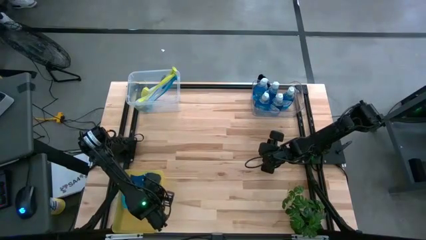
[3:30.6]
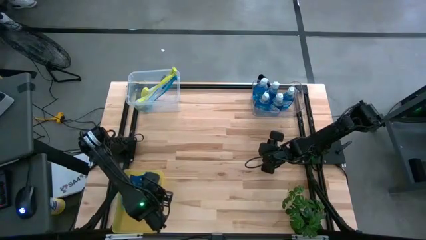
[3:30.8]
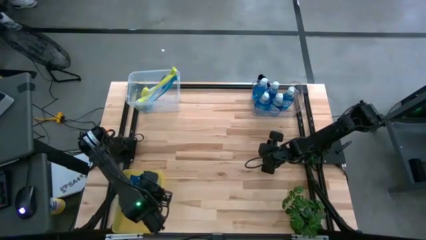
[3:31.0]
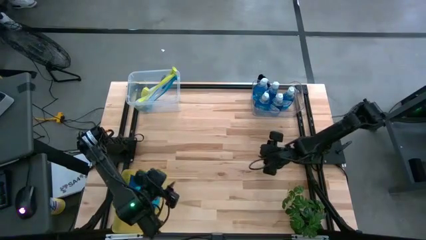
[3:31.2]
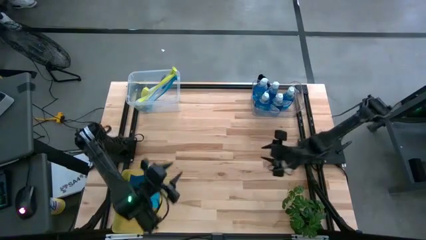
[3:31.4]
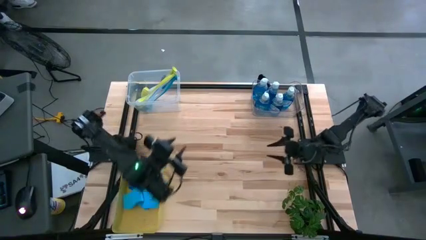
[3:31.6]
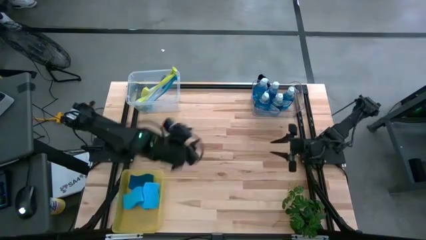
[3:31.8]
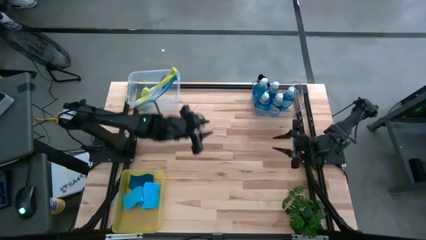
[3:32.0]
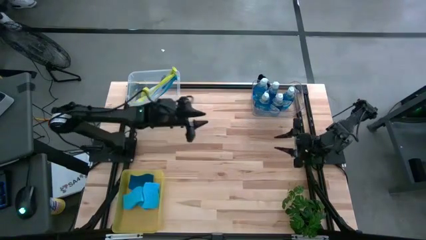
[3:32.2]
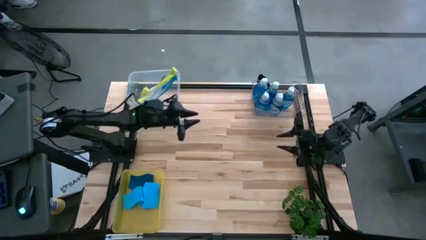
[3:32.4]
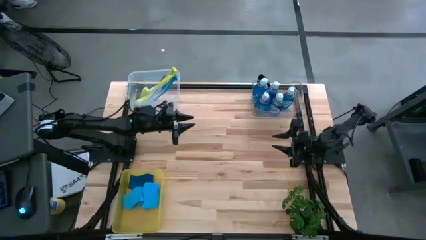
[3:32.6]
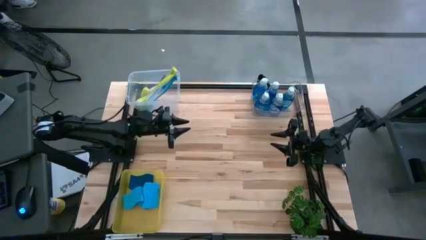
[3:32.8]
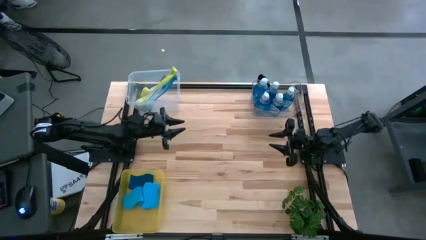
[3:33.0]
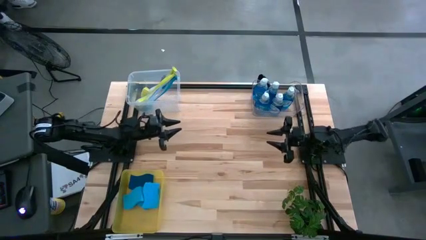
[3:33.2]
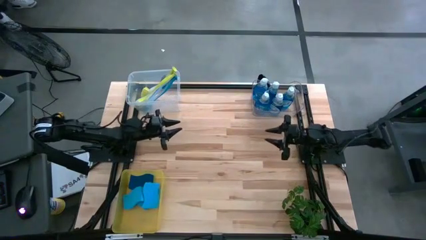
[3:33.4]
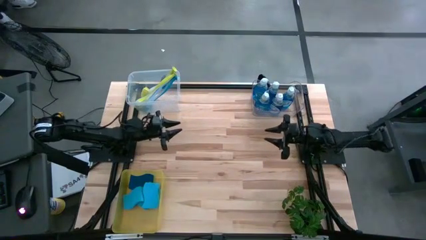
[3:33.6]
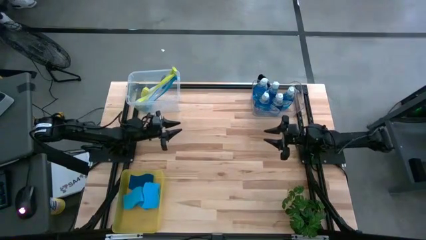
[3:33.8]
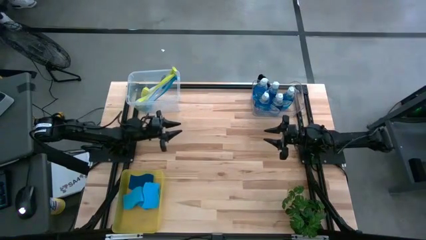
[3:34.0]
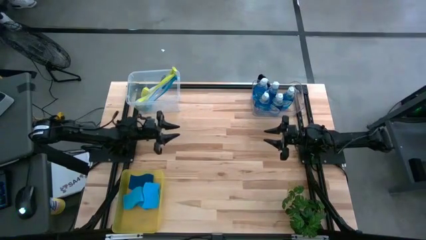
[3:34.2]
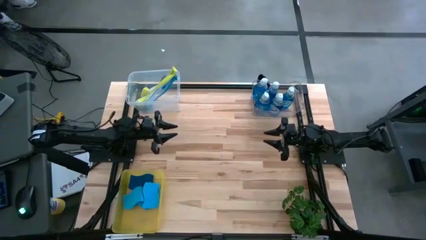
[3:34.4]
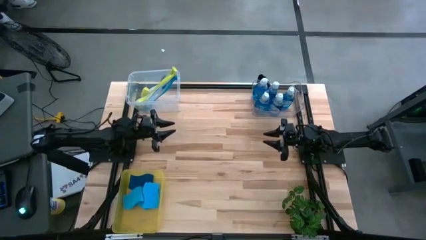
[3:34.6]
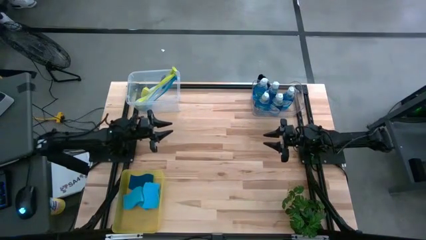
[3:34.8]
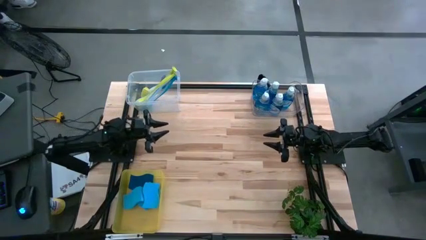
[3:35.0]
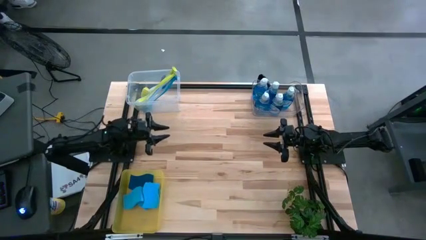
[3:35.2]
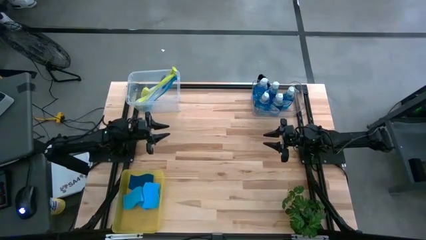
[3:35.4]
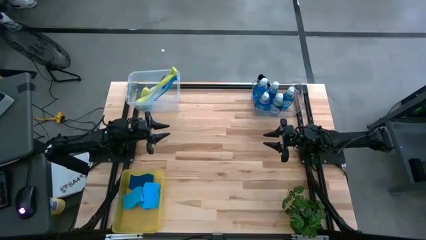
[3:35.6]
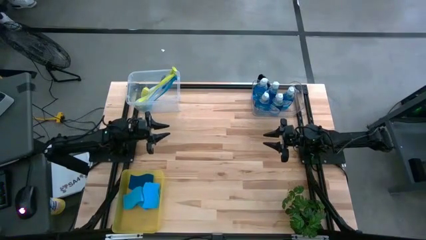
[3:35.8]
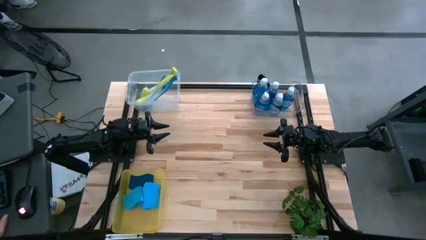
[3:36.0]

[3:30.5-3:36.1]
Task: Pick & Place Kitchen Sink Supplies
Return to Home Position

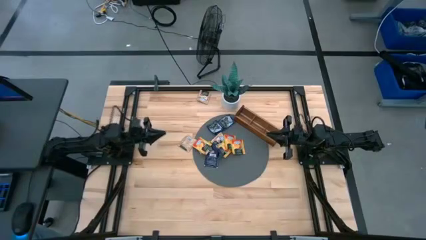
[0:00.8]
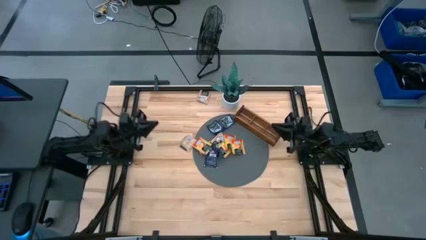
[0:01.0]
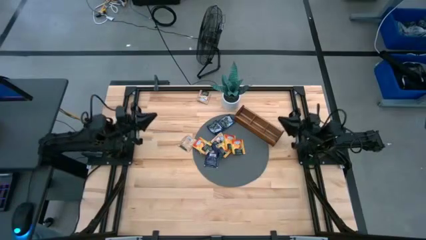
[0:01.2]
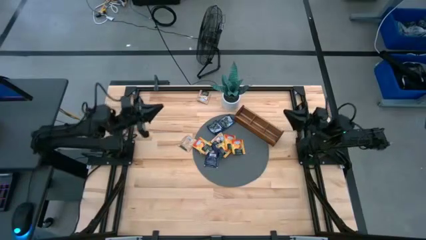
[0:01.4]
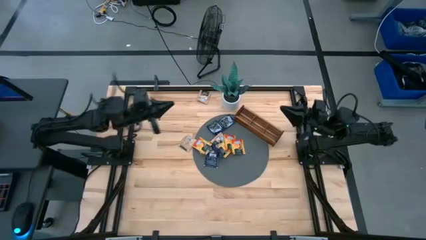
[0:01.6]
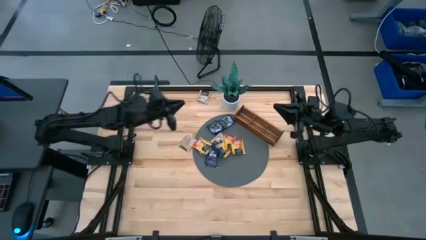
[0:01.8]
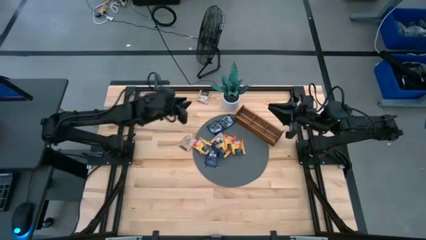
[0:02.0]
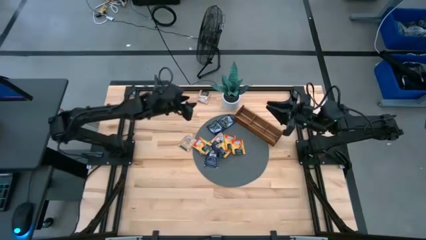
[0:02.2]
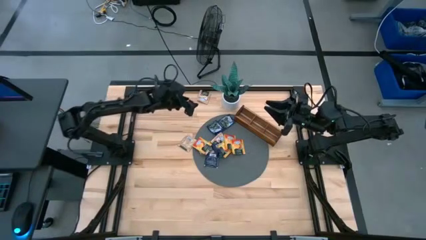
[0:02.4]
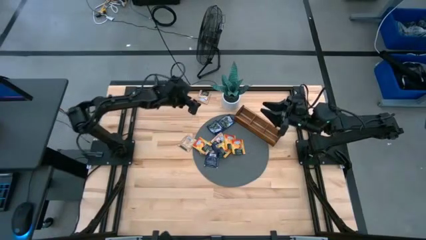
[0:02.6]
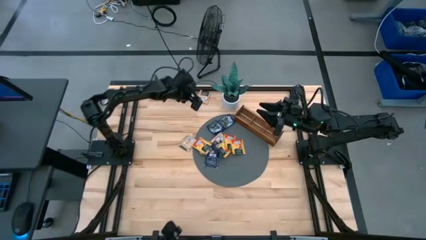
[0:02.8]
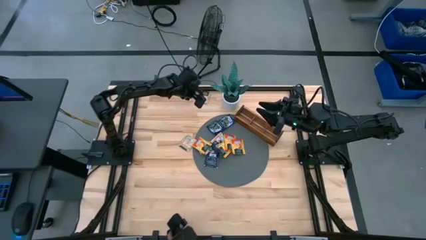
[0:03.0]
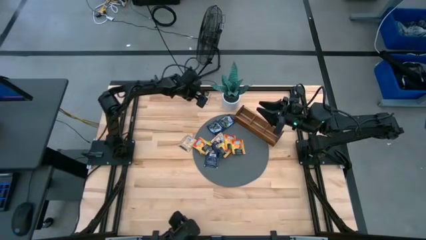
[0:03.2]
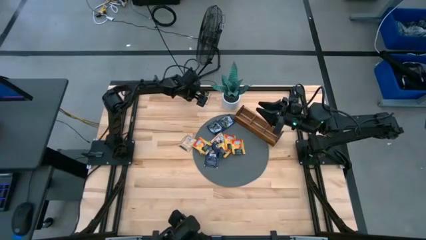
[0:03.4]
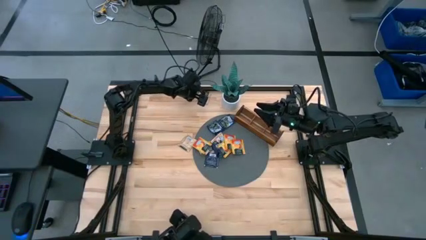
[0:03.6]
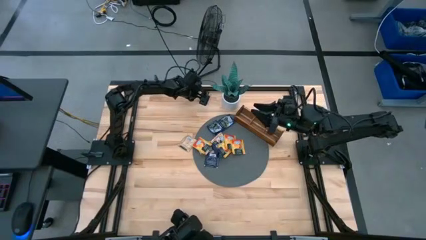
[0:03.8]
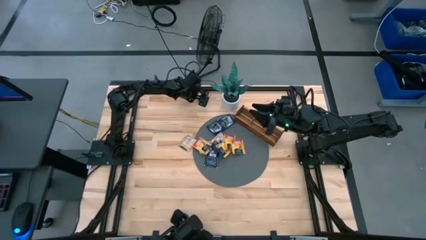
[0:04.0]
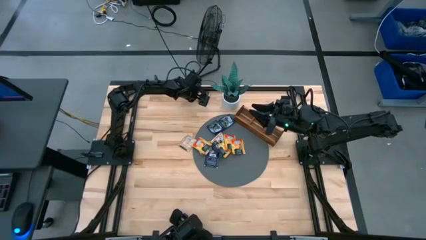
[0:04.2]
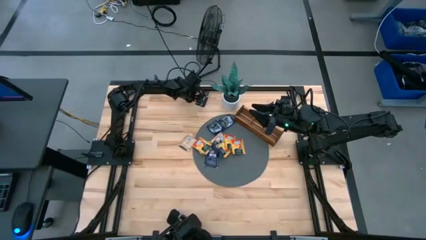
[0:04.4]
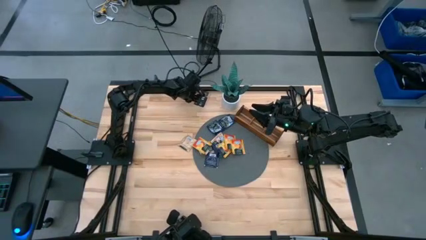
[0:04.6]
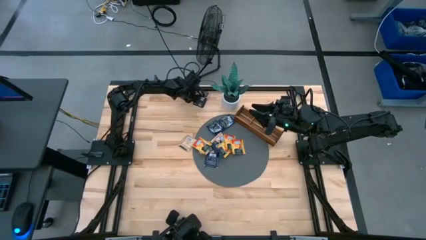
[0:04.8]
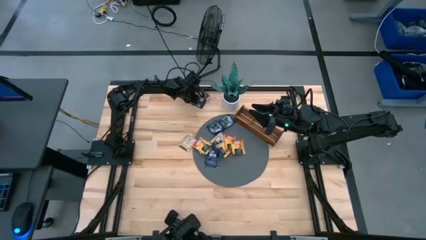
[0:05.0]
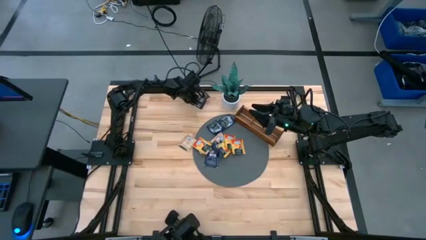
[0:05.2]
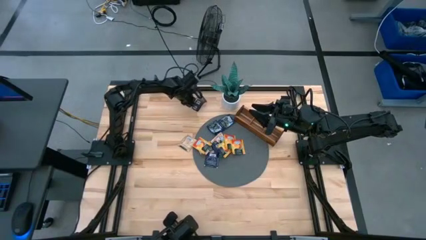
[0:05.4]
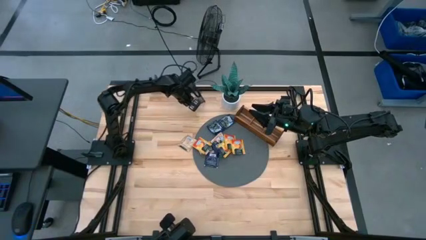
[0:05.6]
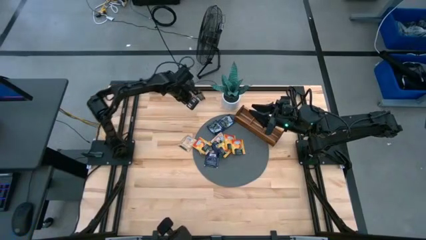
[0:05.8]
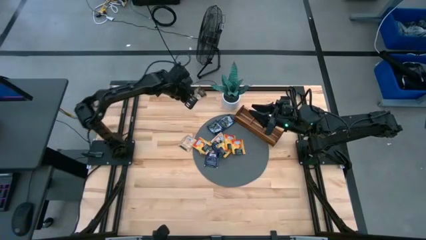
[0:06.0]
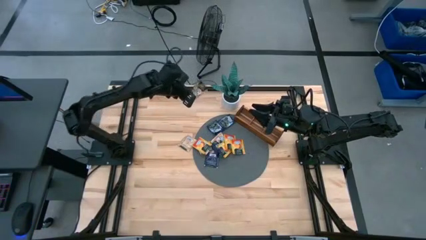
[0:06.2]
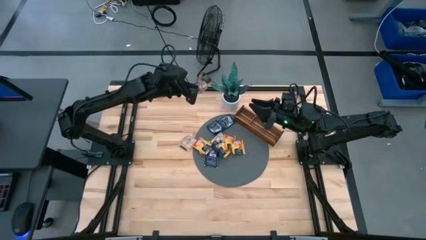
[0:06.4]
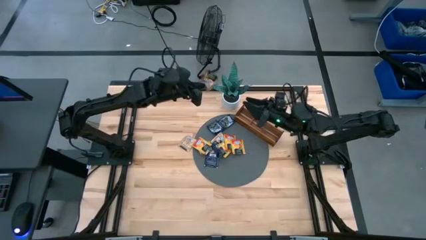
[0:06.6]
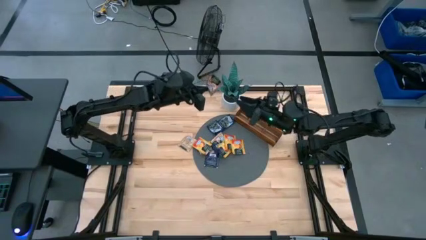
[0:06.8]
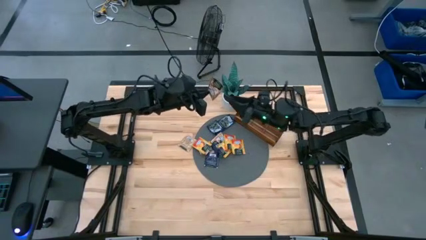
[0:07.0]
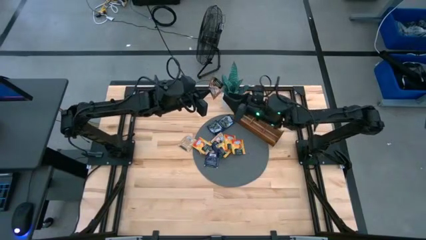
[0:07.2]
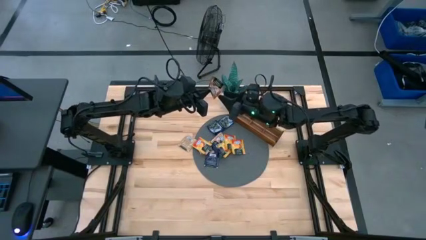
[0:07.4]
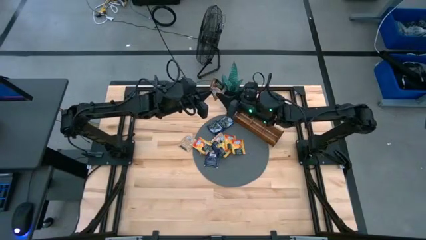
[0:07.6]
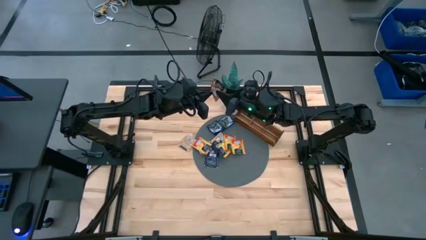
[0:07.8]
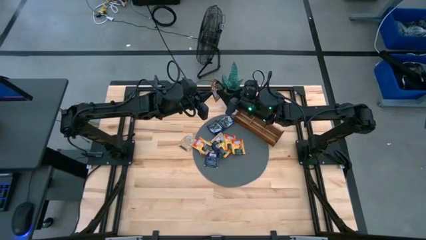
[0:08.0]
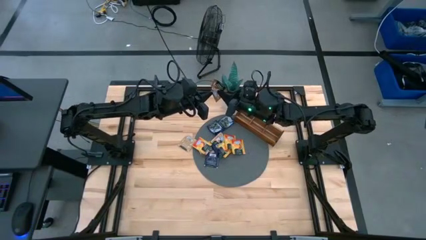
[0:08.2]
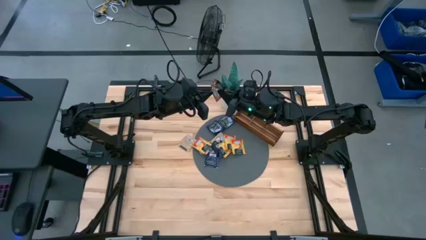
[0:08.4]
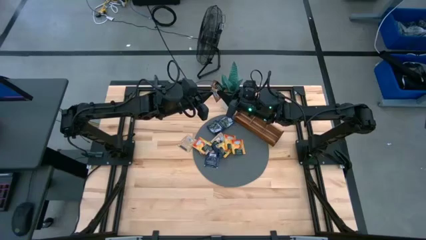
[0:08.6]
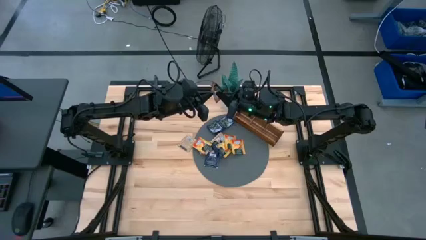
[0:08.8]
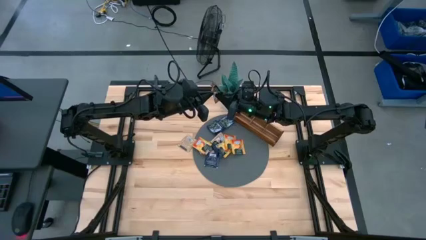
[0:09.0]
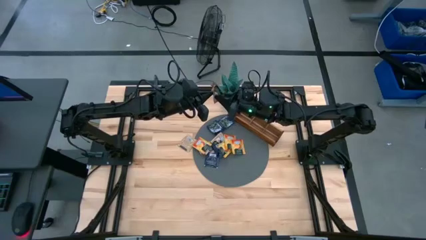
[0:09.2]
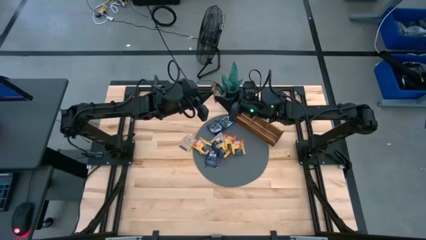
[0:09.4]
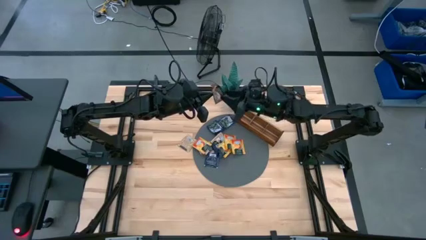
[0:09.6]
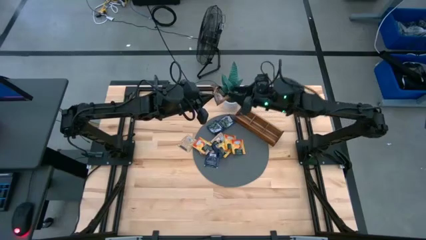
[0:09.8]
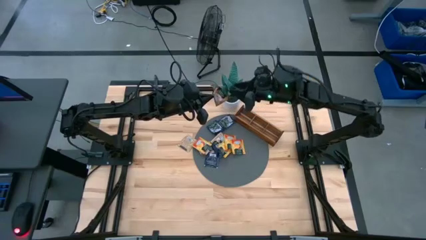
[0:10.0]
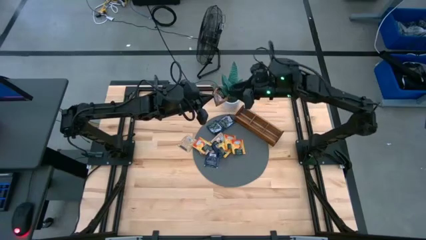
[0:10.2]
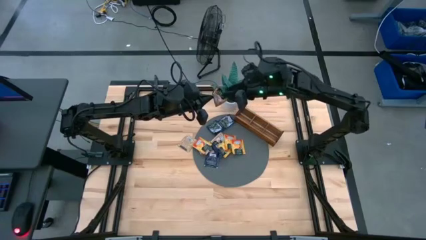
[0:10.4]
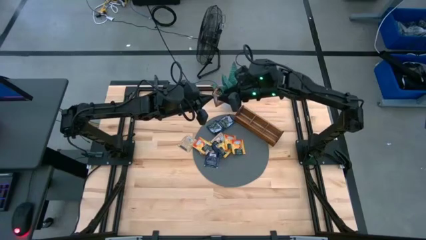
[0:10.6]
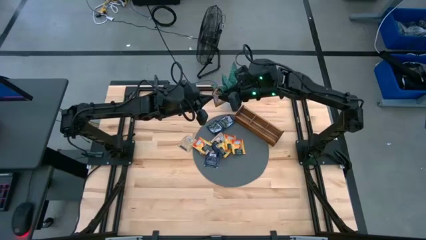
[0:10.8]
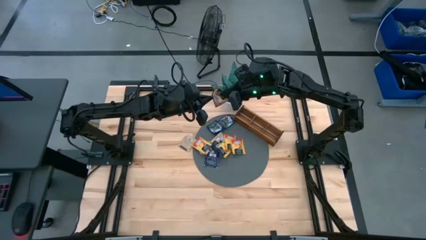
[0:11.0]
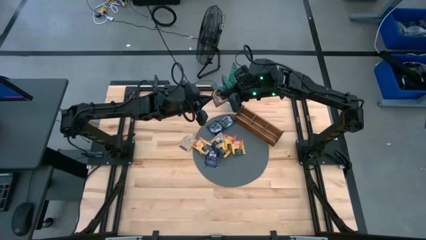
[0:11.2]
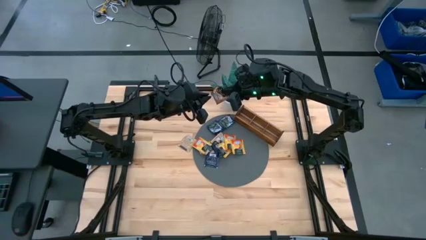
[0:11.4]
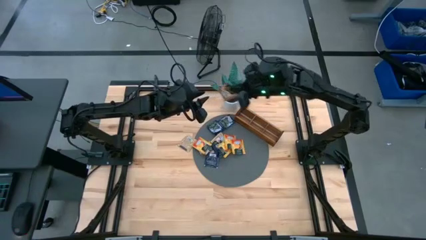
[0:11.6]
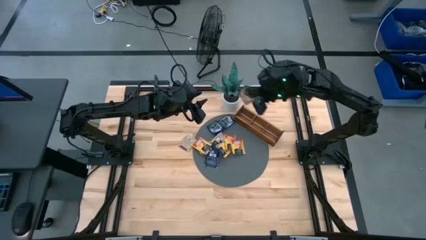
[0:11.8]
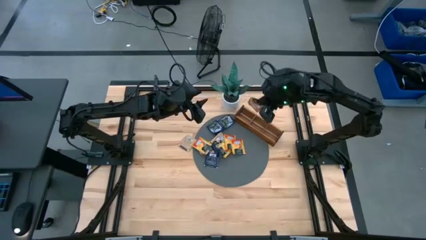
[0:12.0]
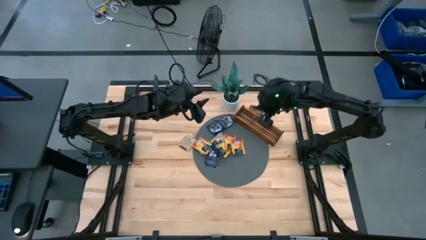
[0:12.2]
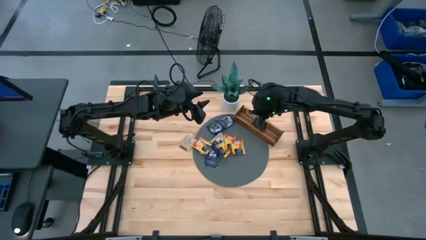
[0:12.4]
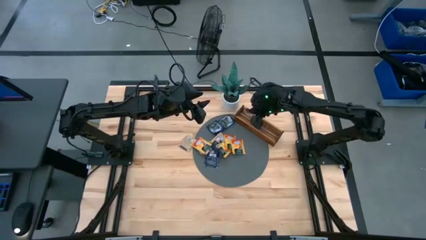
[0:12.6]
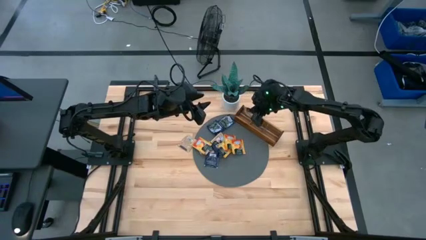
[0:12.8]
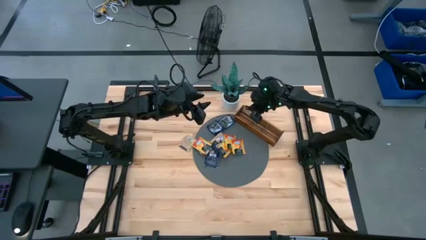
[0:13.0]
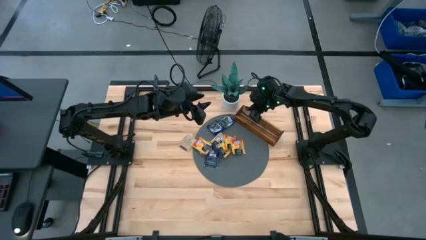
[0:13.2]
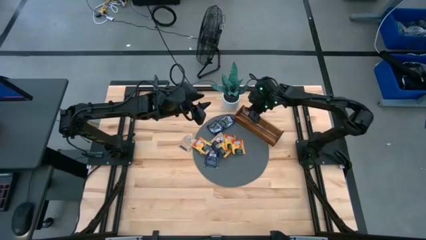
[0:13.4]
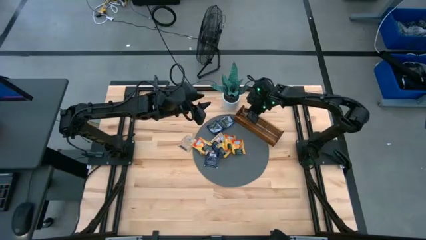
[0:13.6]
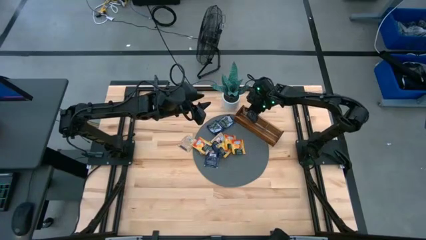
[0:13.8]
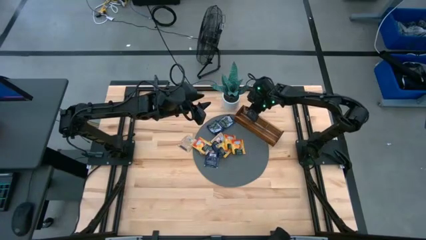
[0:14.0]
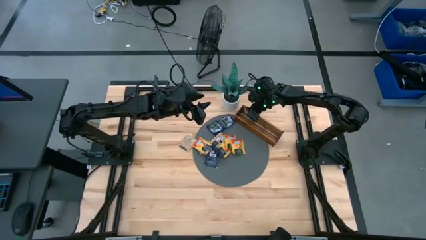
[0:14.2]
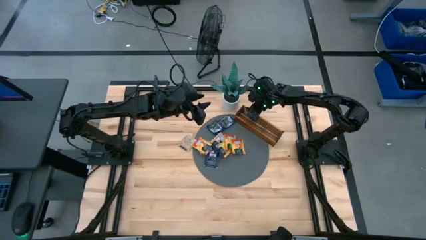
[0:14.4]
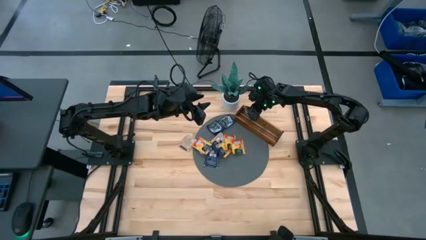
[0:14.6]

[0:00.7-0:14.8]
Task: Pick & Place Tea
Put the brown tea tag into the wooden organizer
